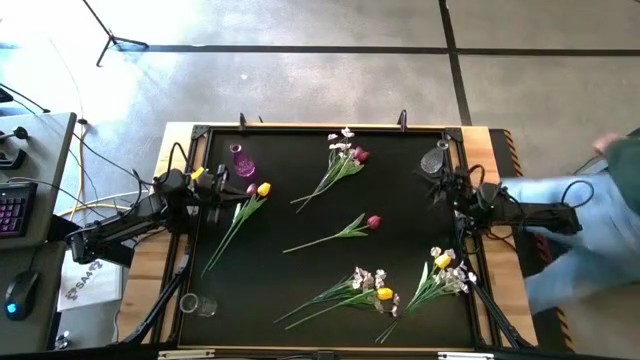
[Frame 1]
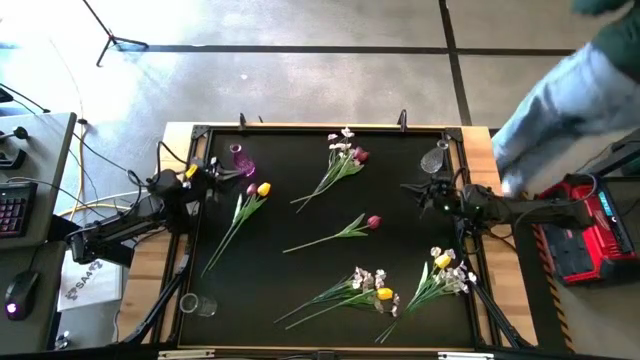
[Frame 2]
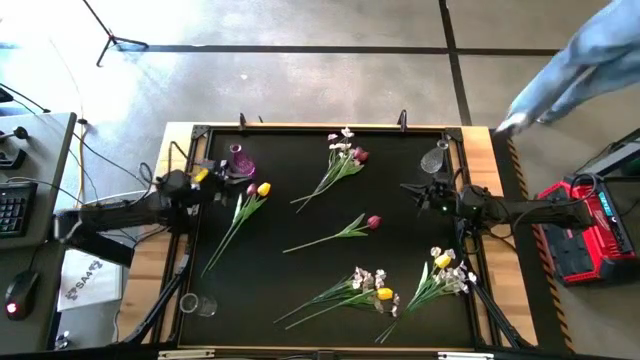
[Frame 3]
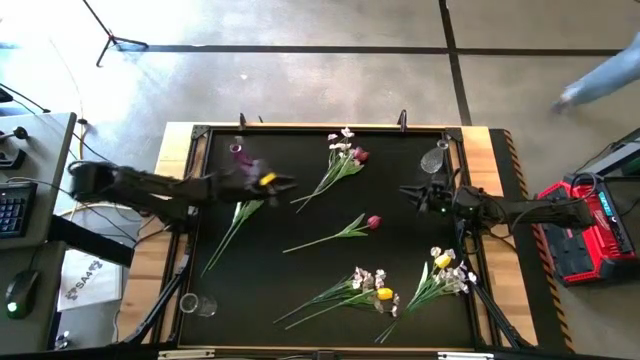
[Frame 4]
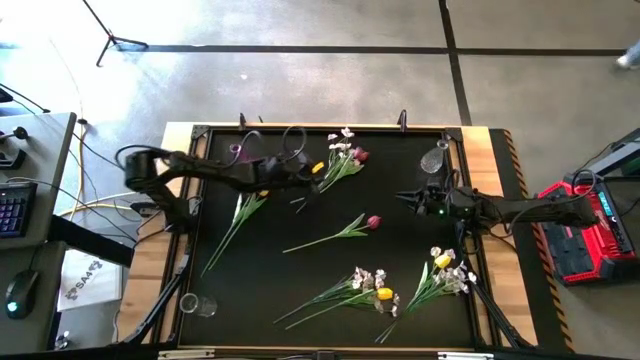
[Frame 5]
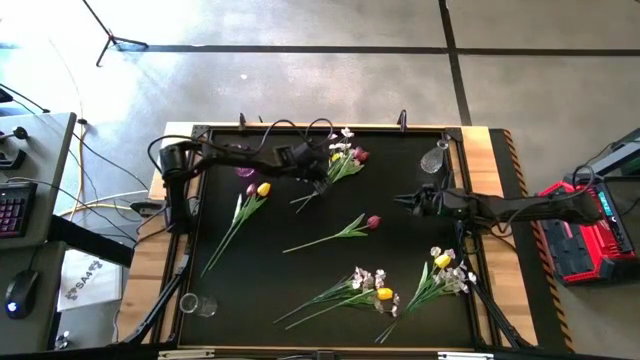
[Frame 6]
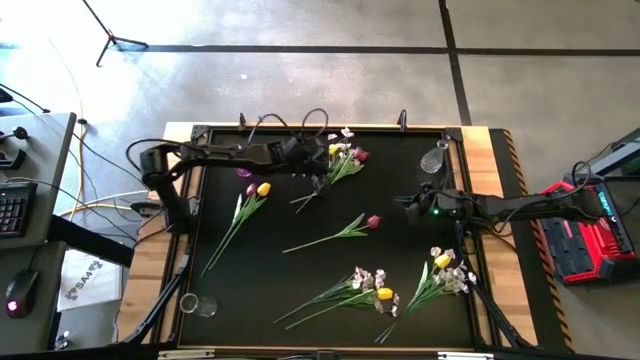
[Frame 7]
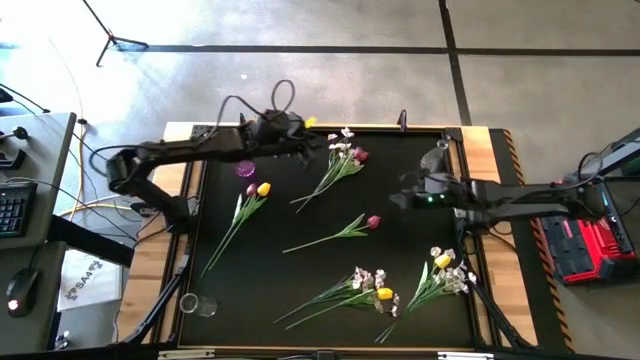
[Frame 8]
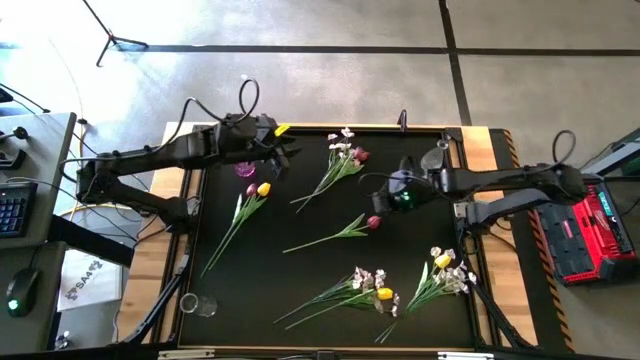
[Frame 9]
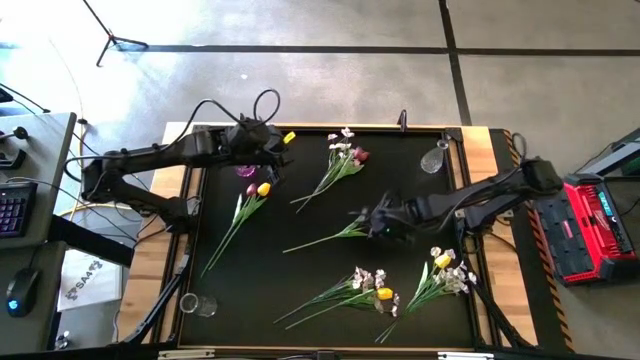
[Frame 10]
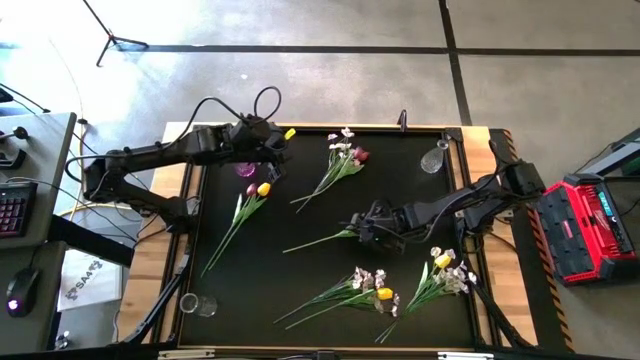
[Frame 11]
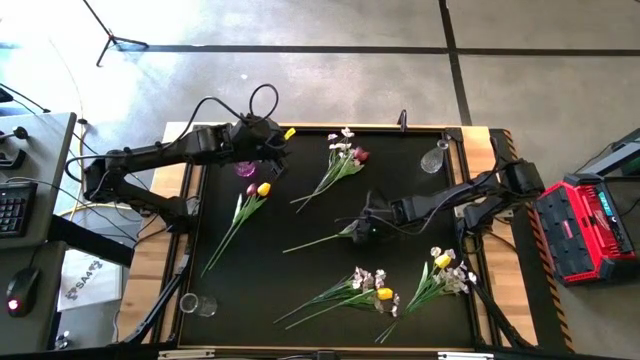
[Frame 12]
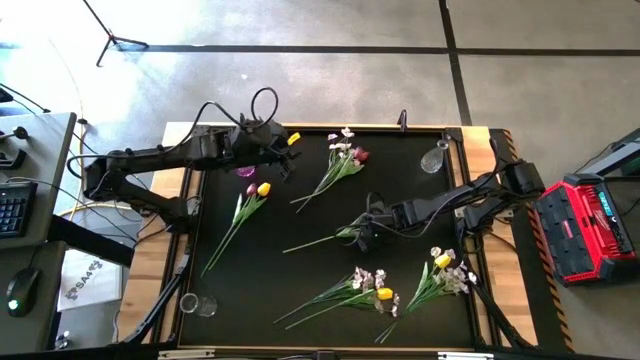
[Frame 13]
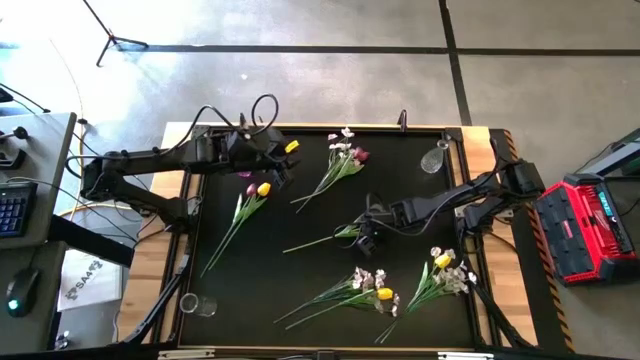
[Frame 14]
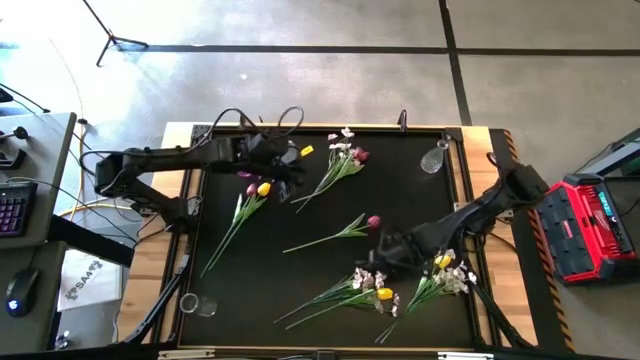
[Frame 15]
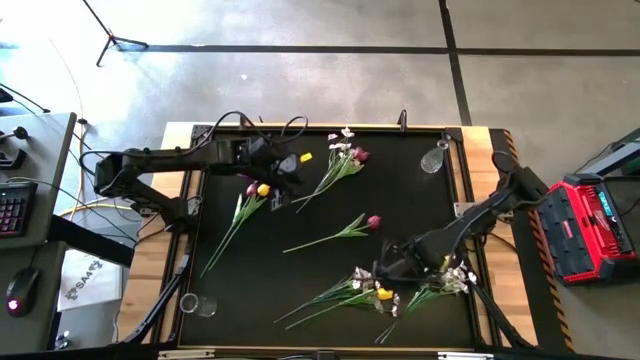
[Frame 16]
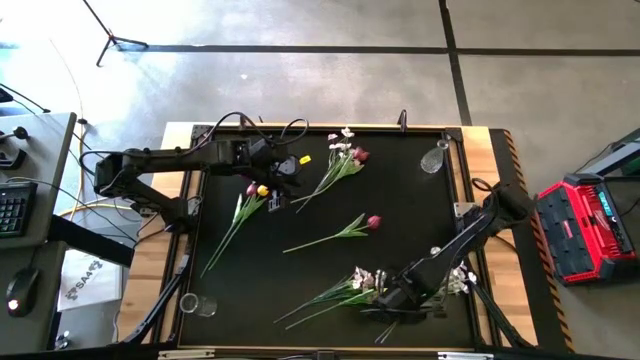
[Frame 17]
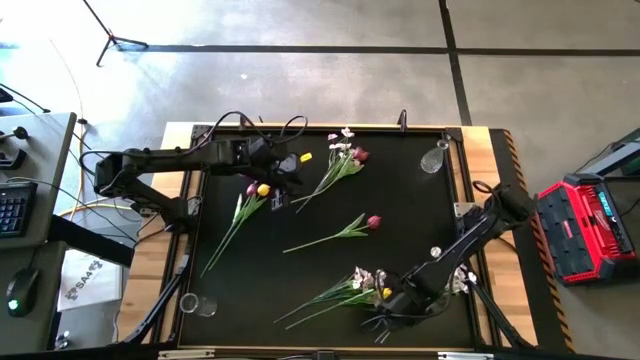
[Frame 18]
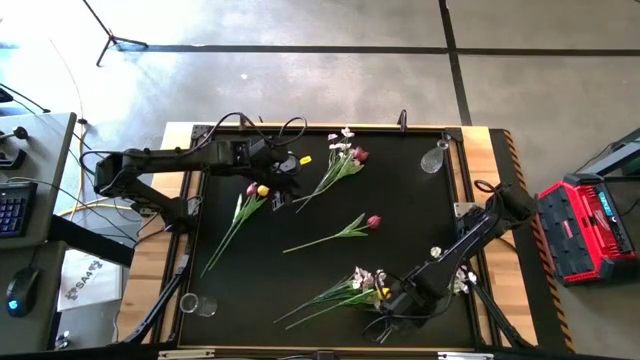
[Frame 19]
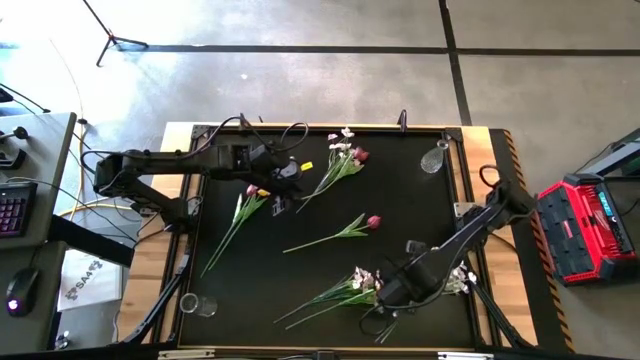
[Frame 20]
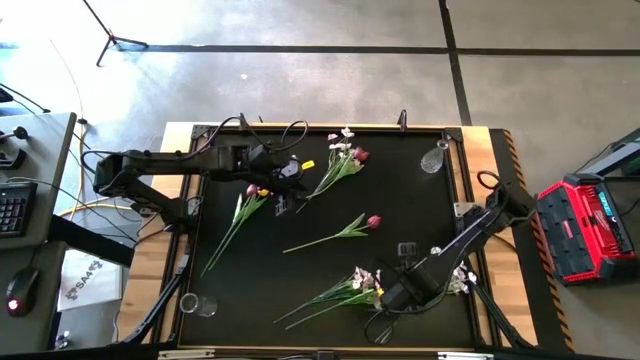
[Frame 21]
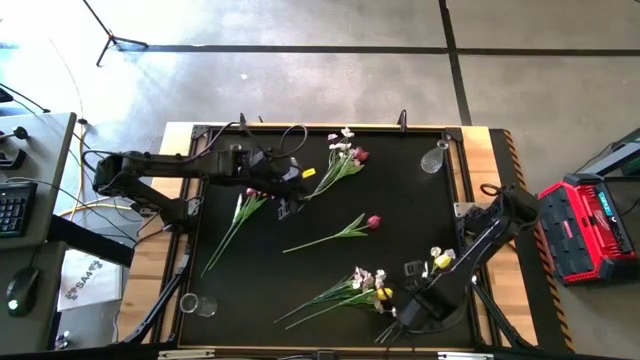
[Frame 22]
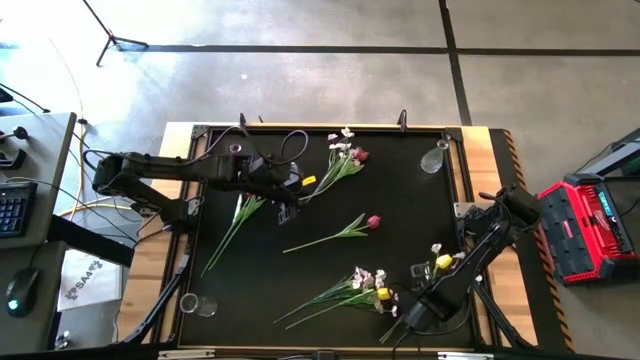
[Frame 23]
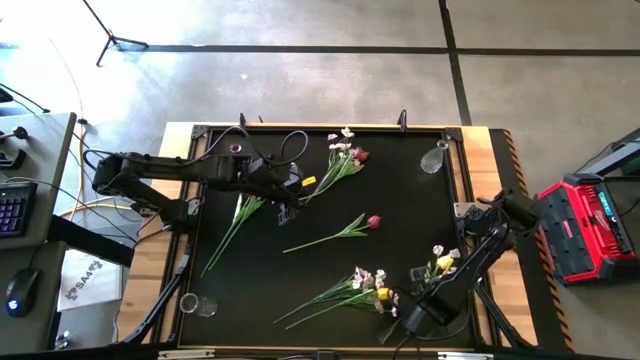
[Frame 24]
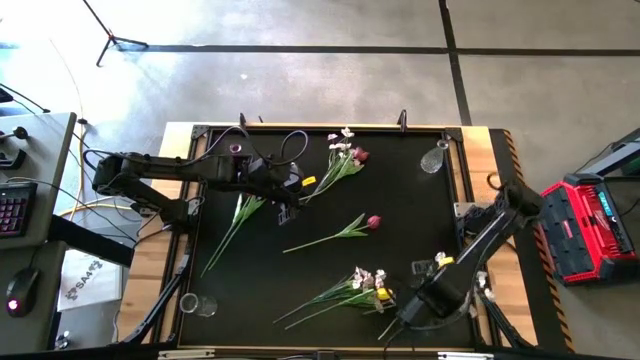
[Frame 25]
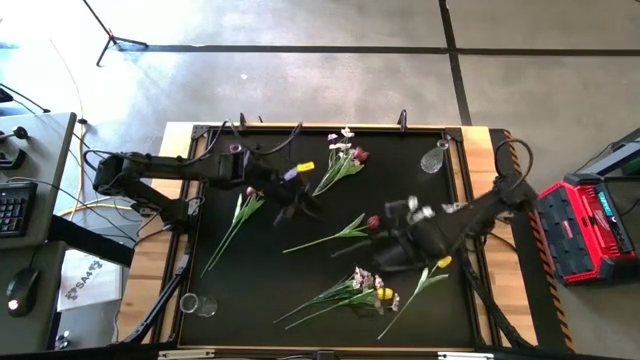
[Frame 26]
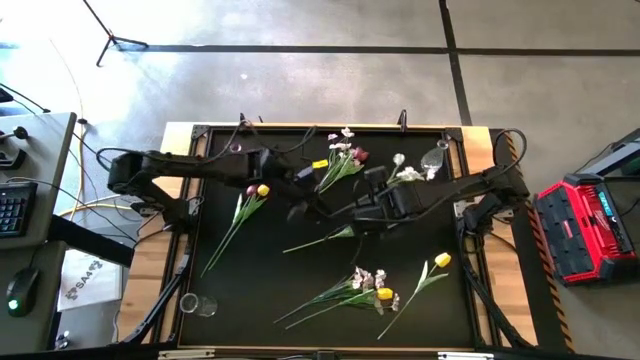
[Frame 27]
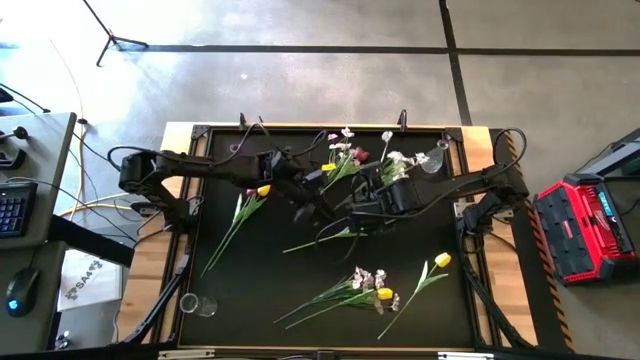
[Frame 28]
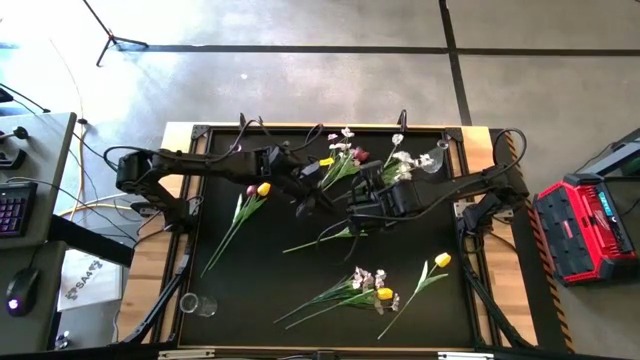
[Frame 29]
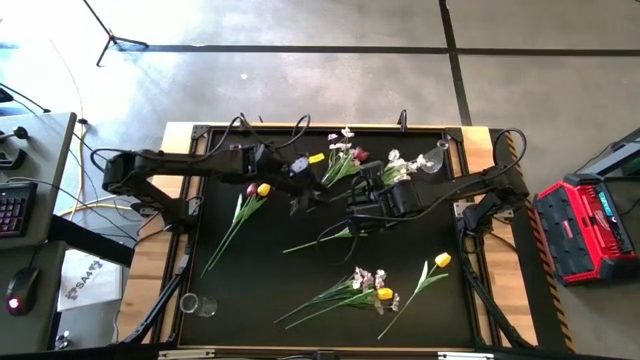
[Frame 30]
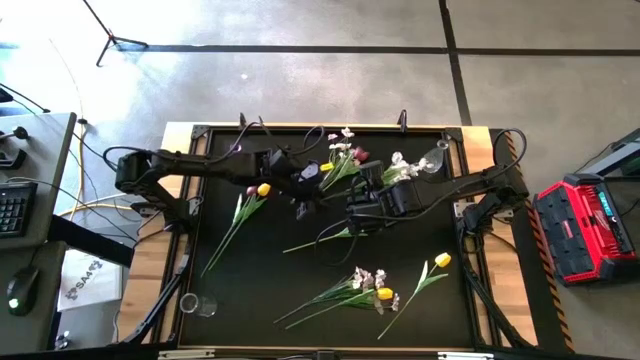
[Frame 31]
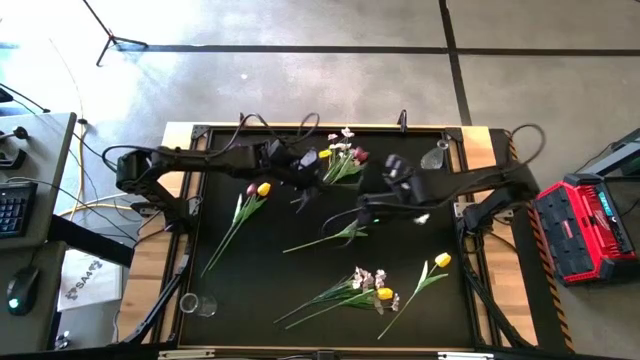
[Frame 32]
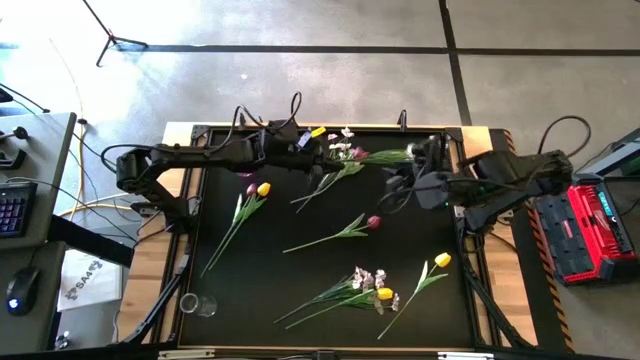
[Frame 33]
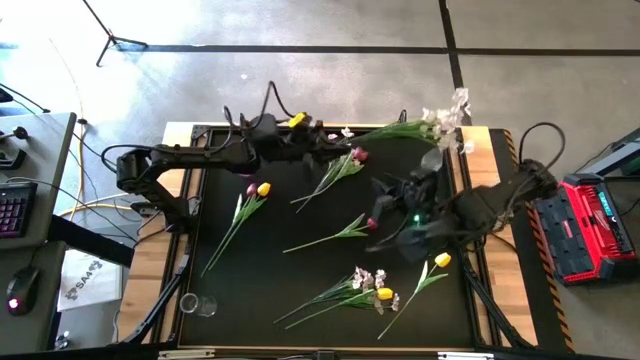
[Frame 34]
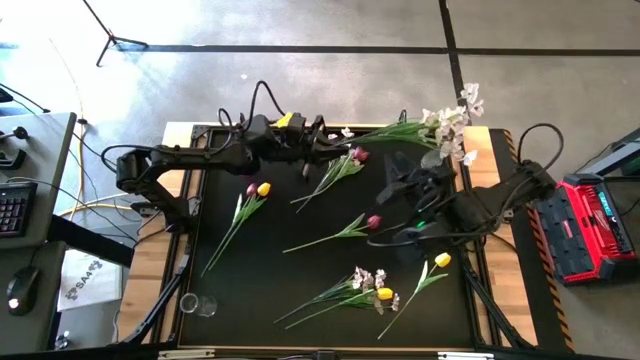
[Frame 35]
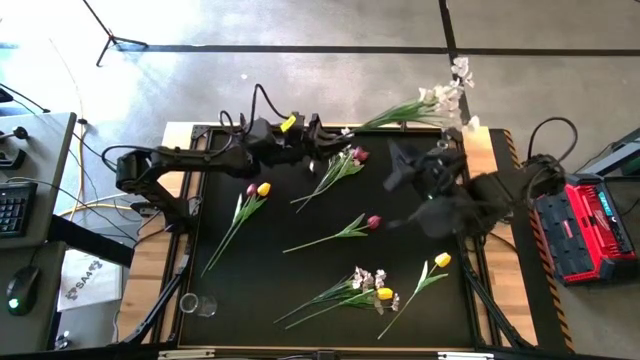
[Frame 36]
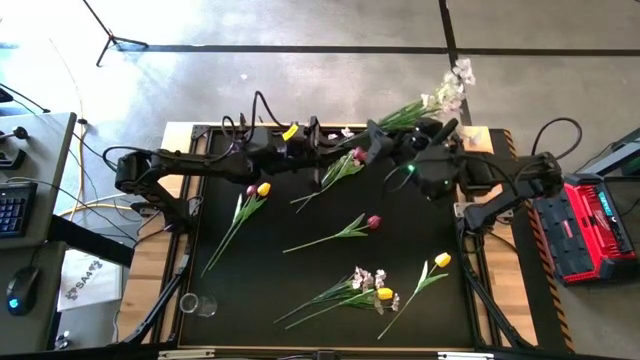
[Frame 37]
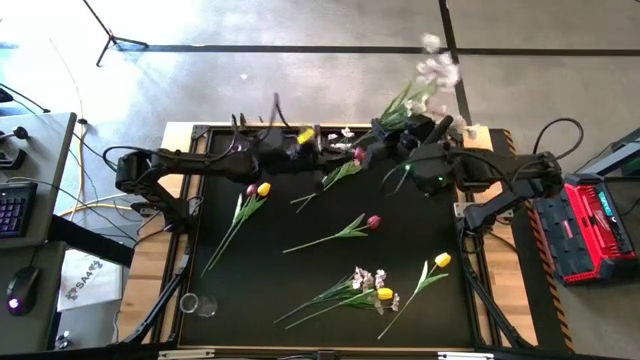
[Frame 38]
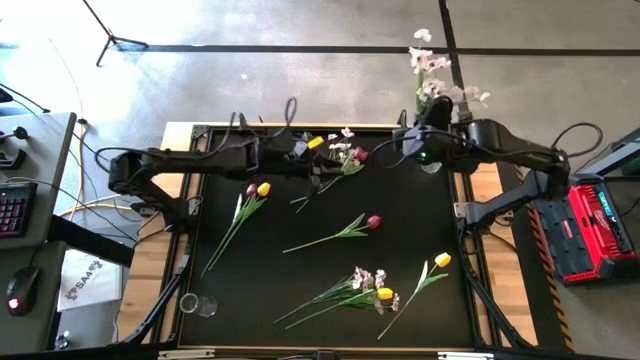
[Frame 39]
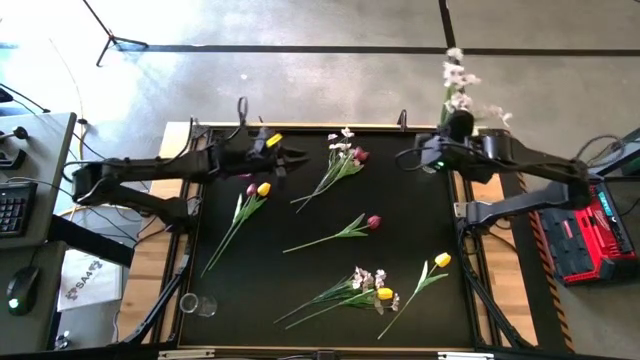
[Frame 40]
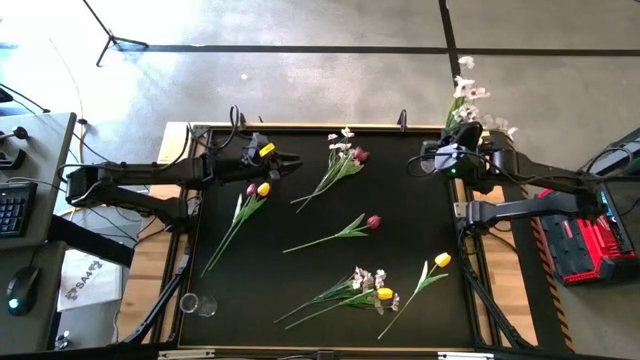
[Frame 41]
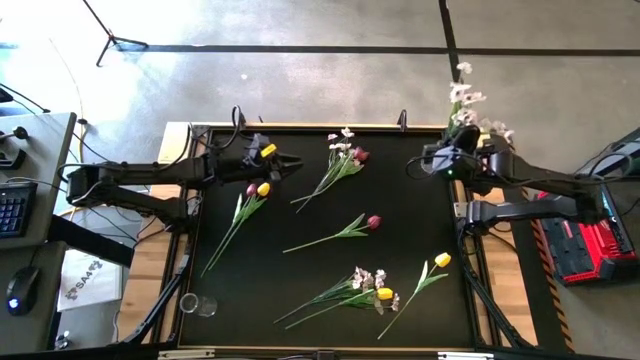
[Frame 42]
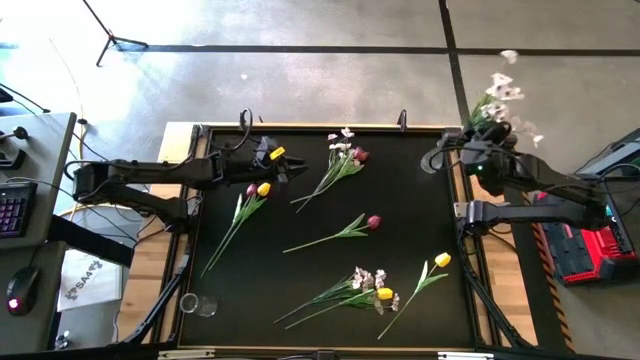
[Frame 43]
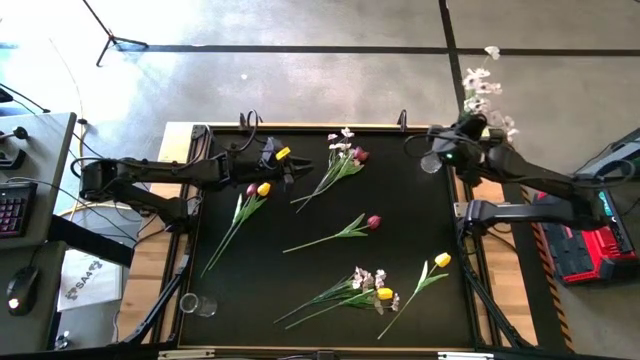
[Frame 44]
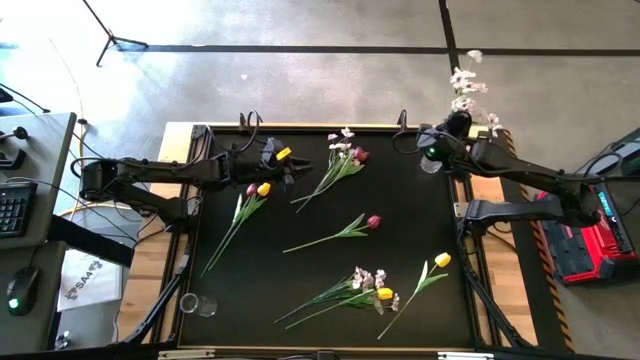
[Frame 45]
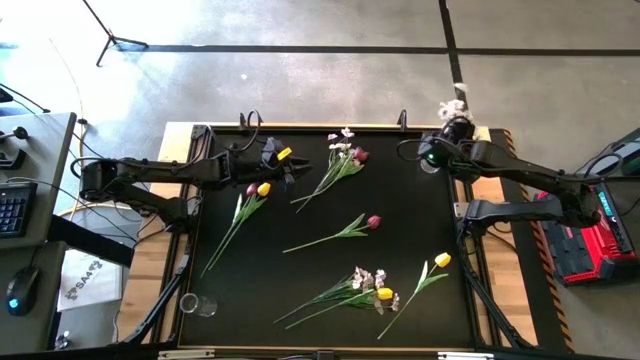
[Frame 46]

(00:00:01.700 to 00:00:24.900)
Task: Sort flowers into vase by color
Put the bottom right white flower into the top right transparent vase
